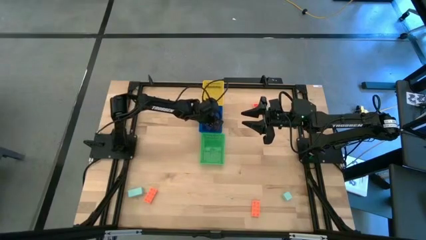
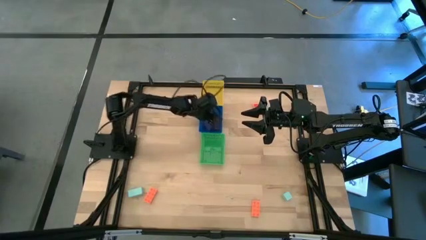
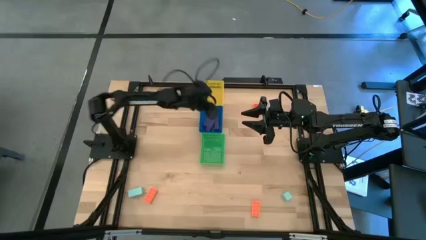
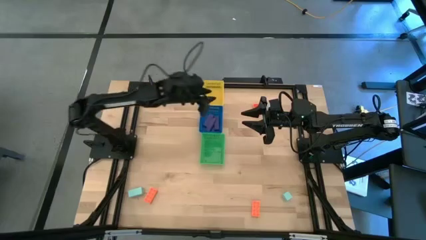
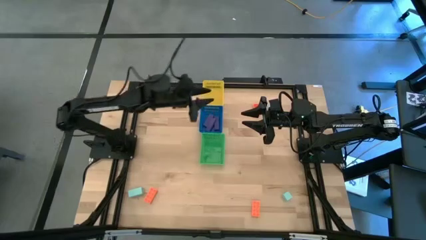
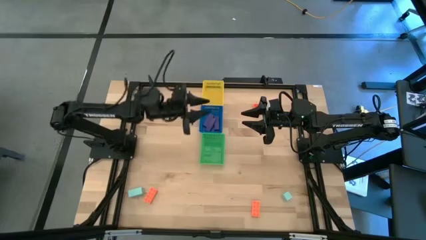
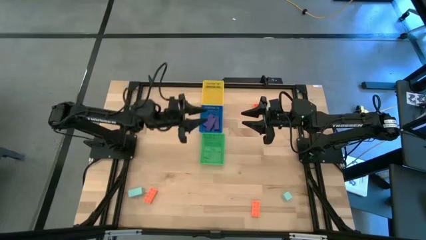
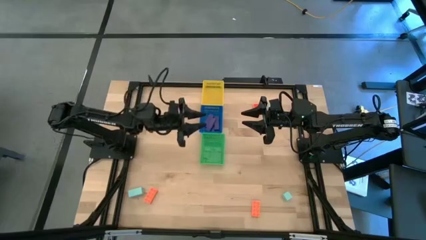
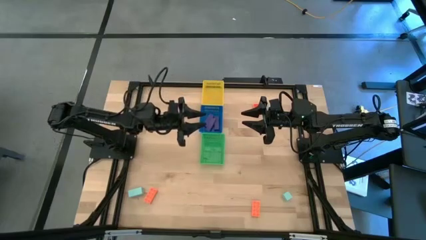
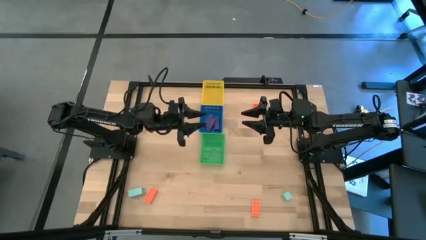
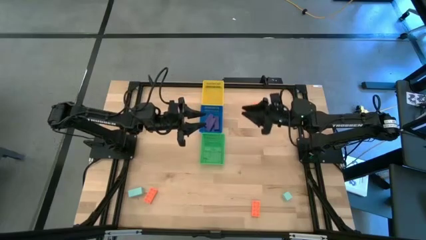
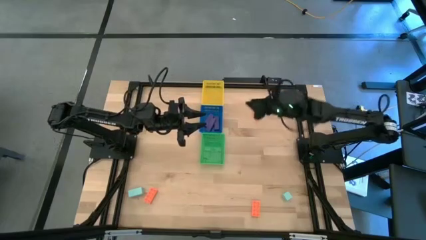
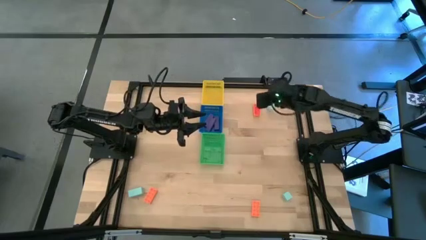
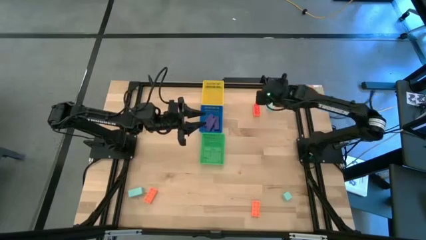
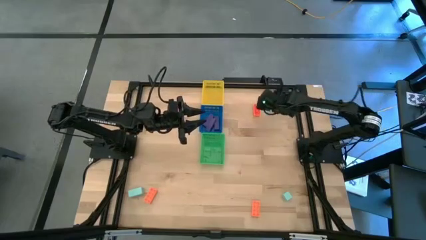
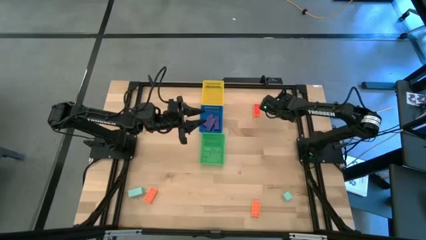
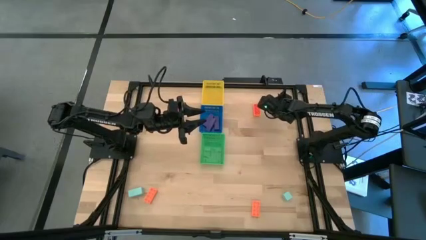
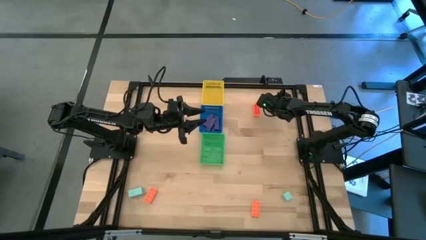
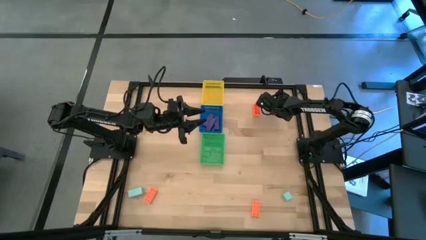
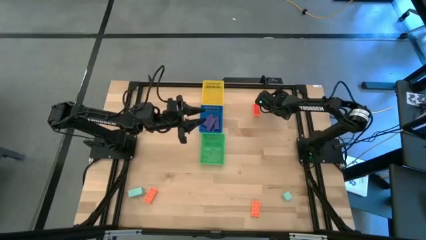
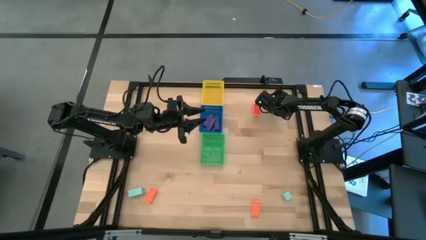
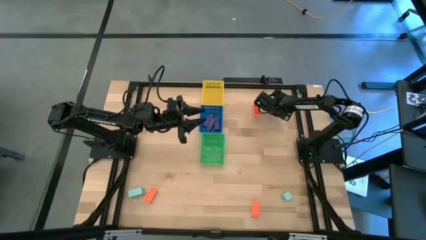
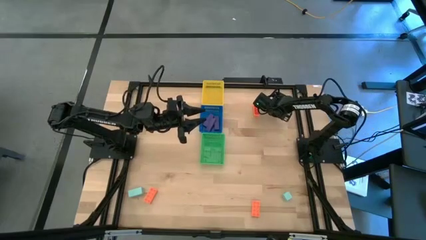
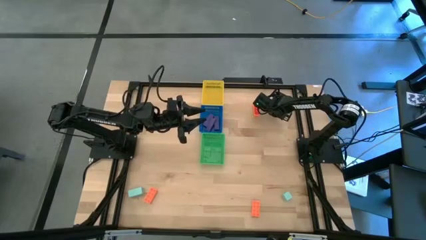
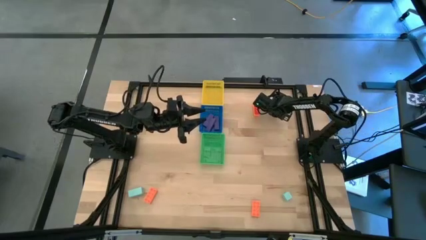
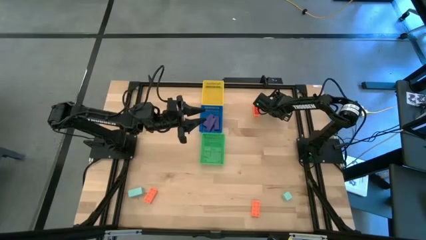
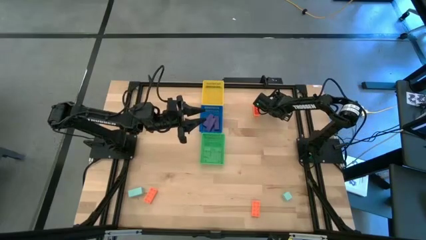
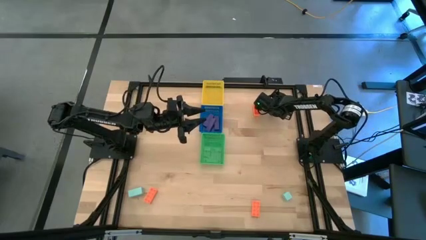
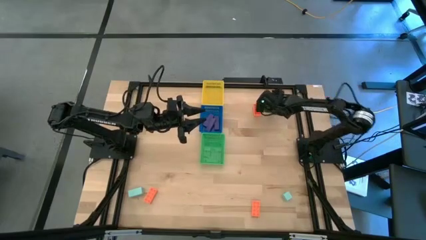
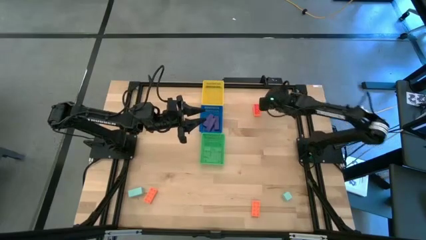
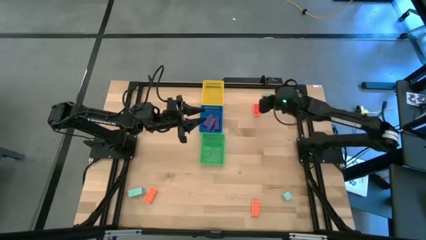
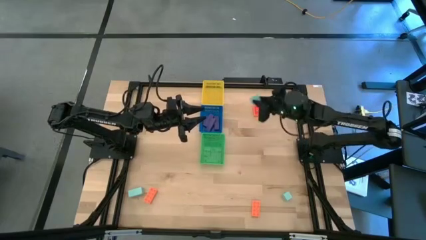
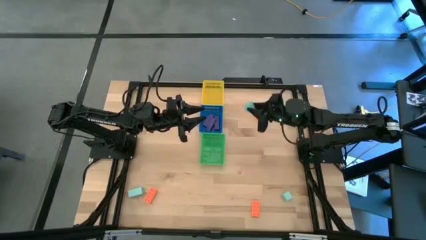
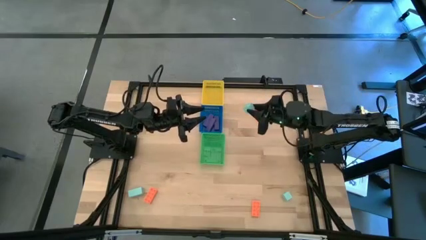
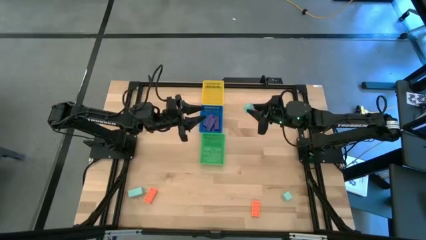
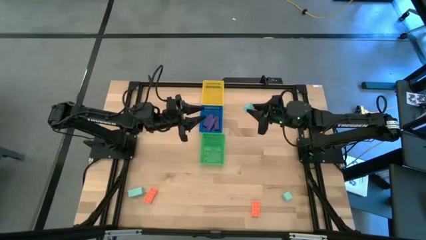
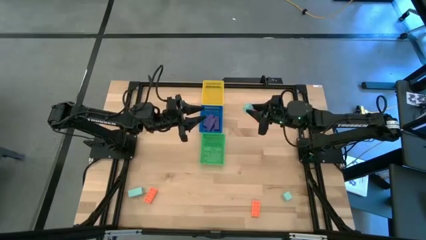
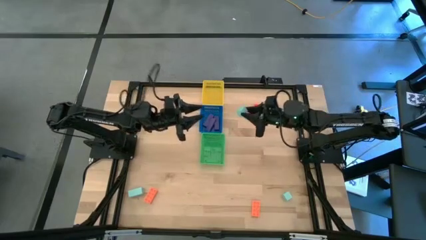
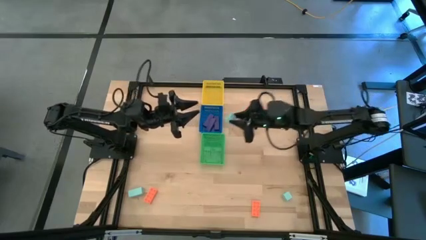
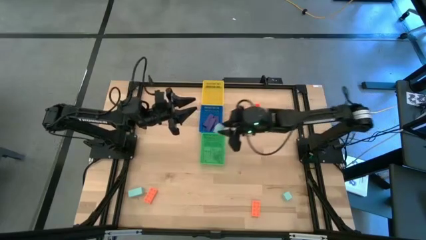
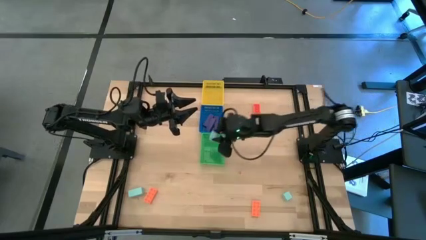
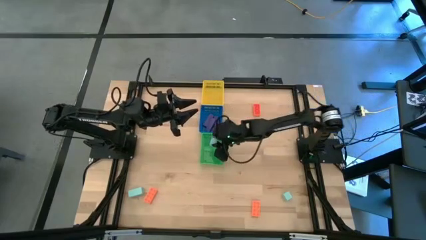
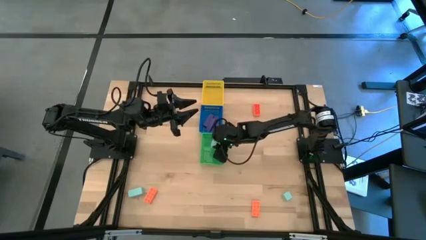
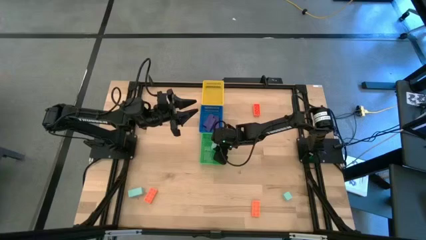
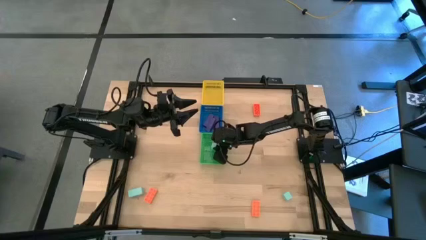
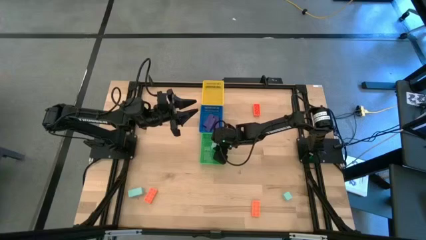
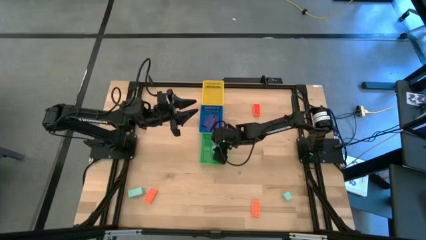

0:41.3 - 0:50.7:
Task: Sort & place blocks by color
Put the top light blue block into the green basket

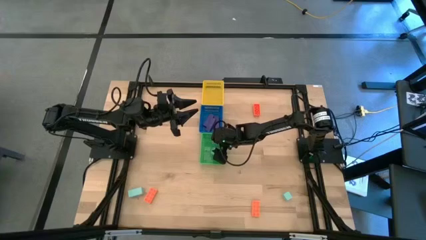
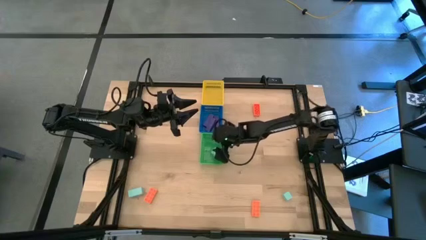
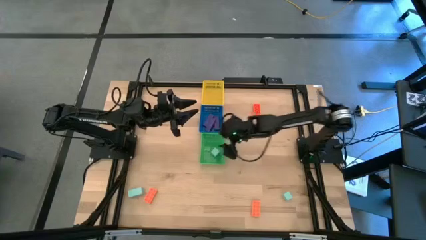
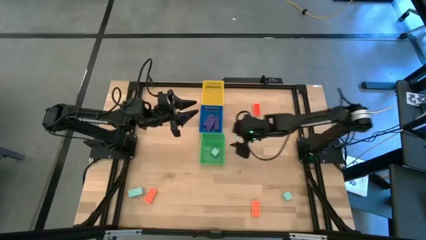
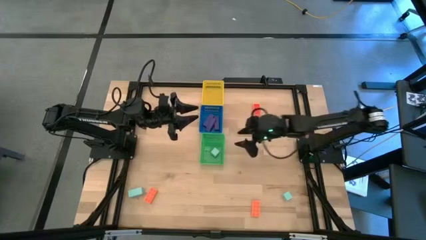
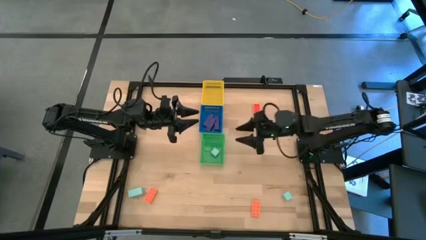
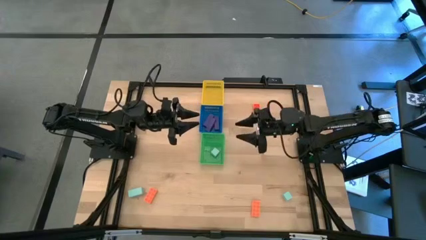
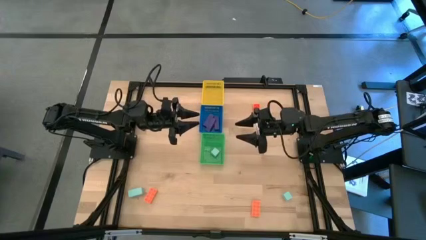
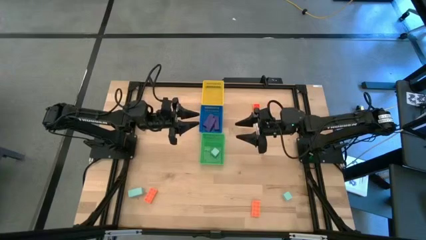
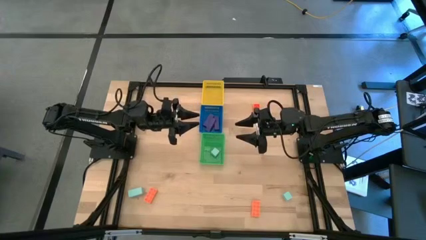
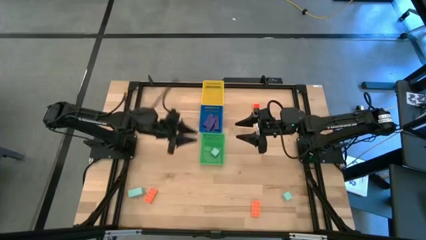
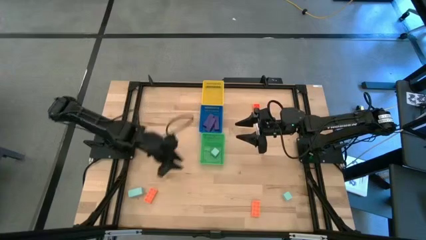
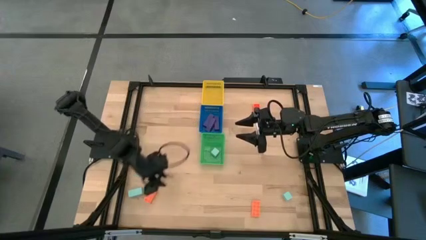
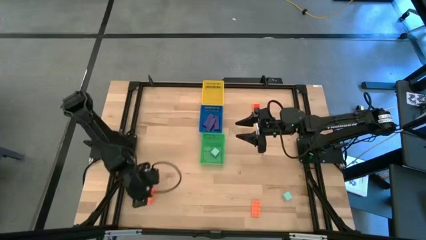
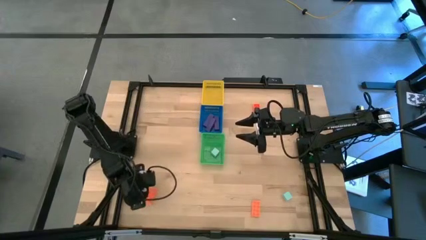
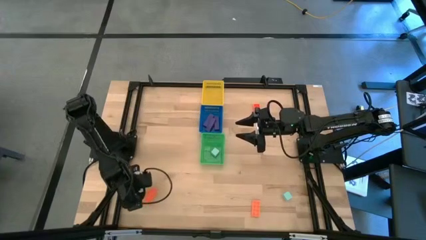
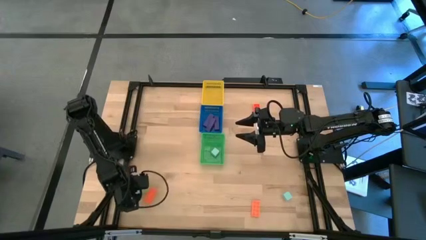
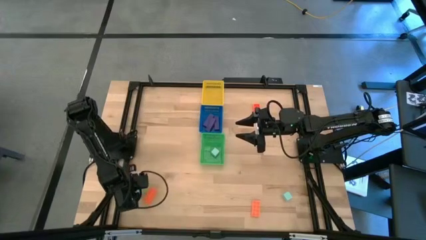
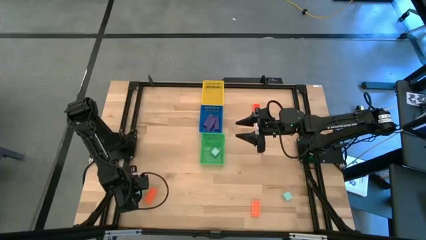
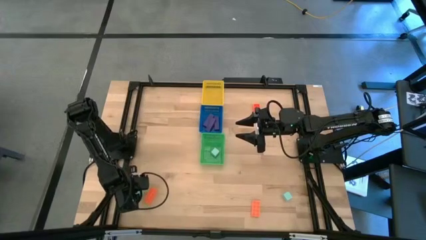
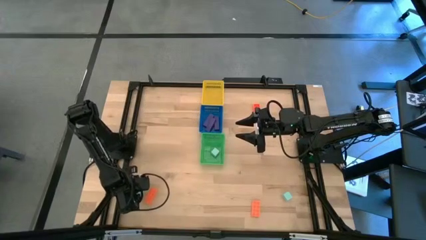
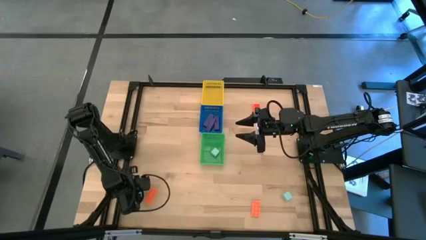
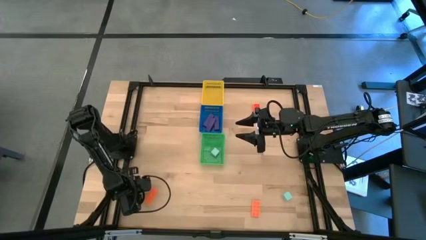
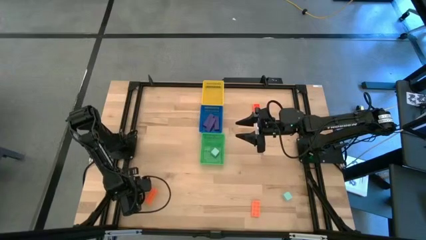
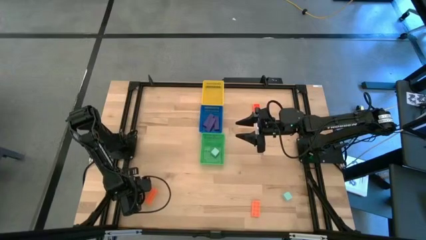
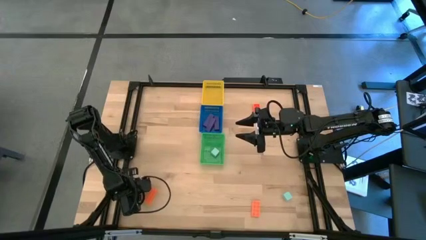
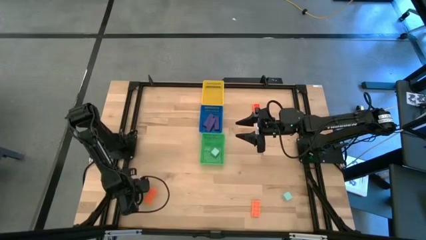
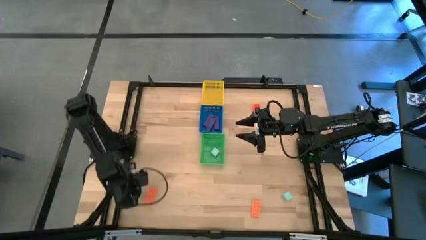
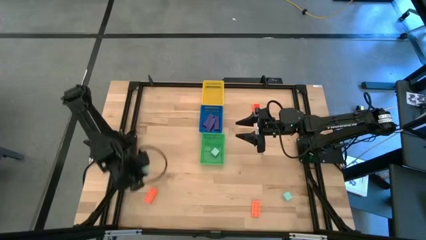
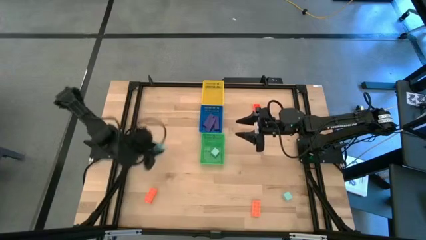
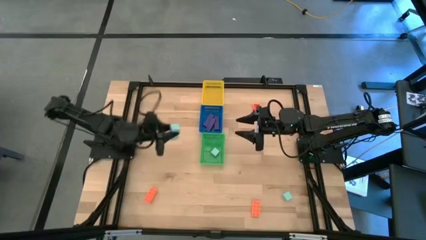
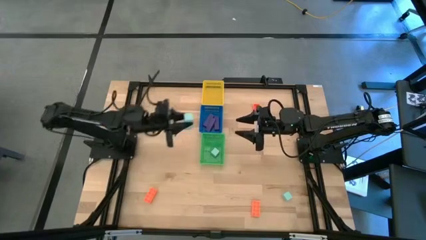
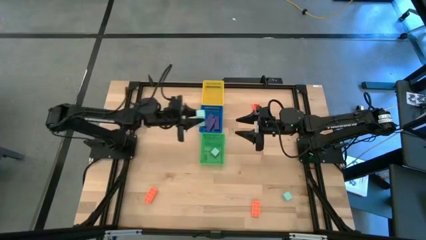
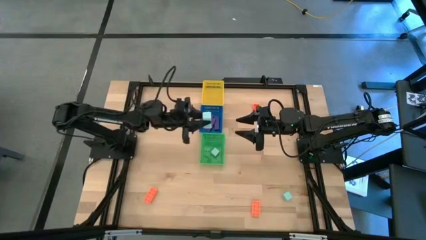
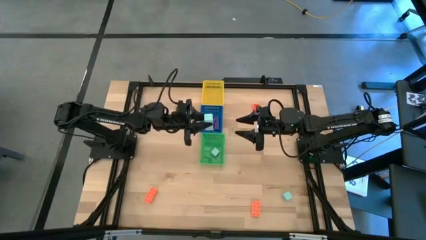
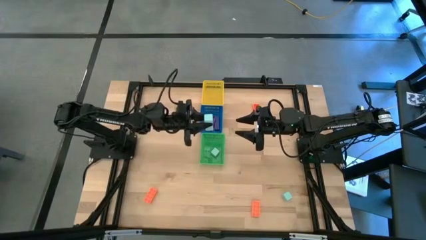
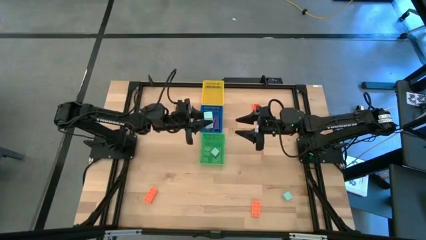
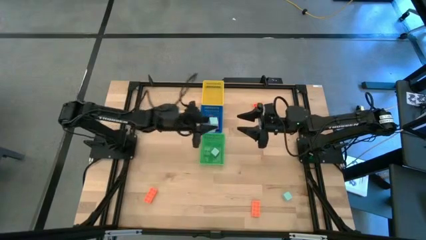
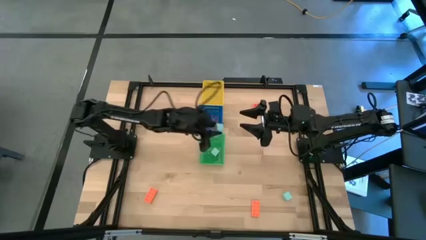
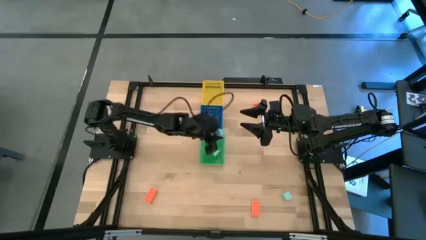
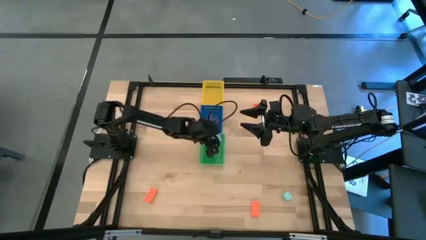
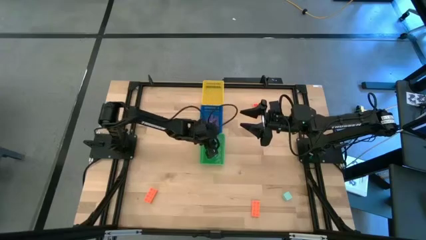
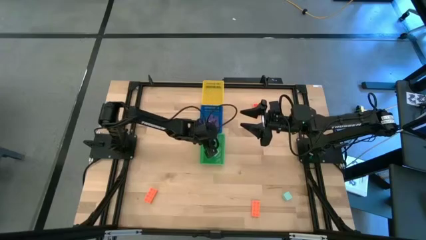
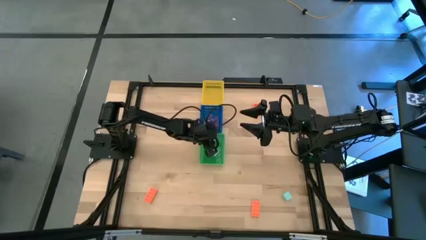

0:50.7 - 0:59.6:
Put the left light blue block into the green basket
